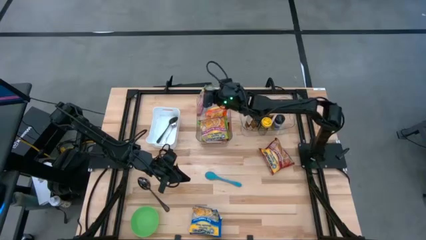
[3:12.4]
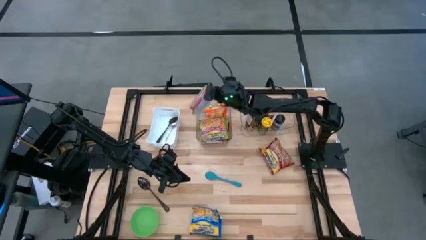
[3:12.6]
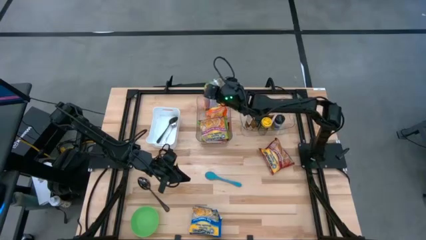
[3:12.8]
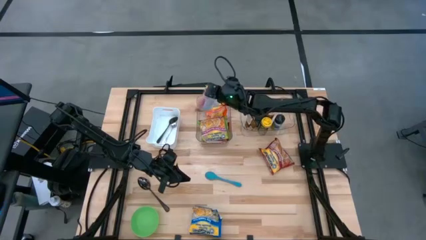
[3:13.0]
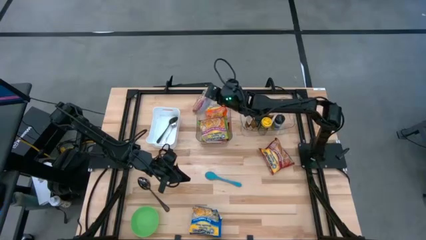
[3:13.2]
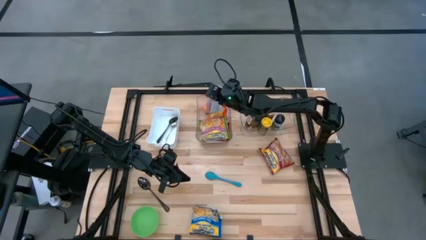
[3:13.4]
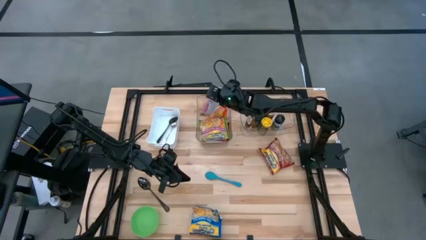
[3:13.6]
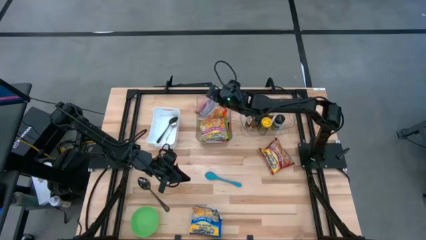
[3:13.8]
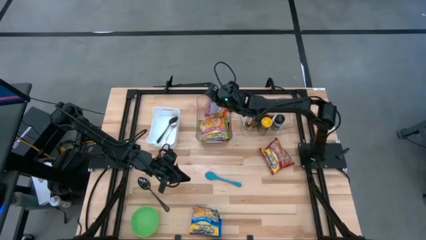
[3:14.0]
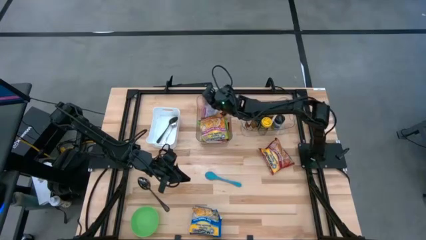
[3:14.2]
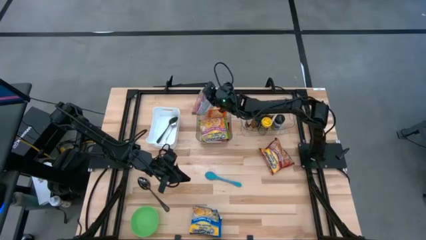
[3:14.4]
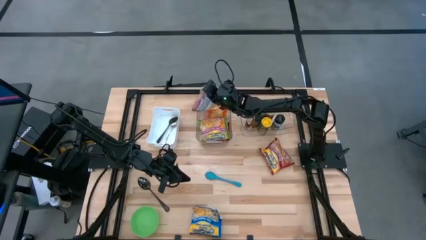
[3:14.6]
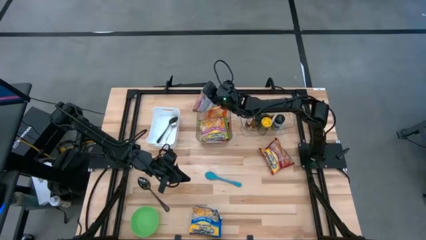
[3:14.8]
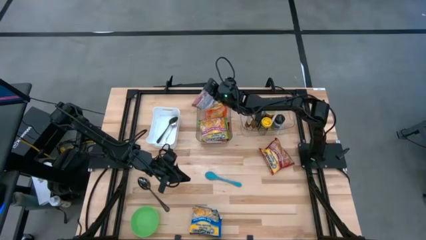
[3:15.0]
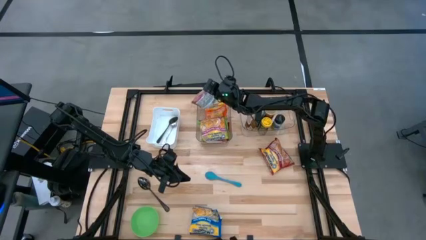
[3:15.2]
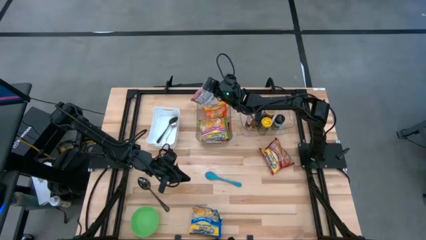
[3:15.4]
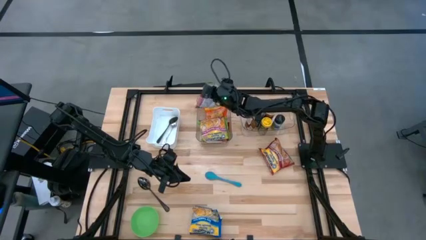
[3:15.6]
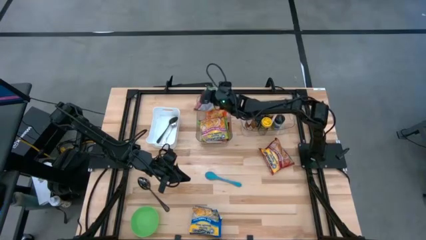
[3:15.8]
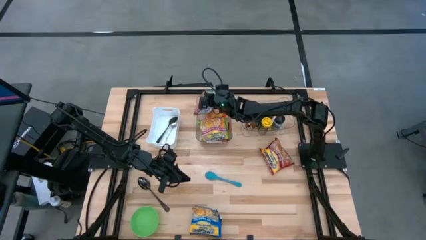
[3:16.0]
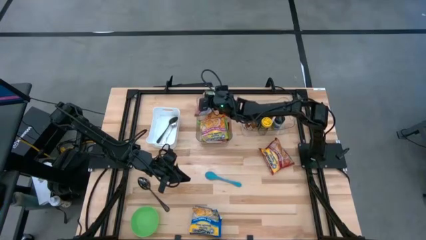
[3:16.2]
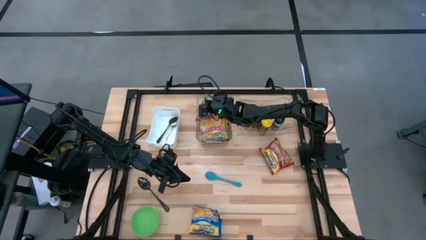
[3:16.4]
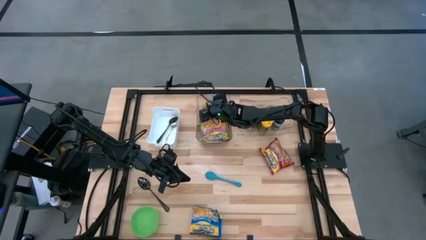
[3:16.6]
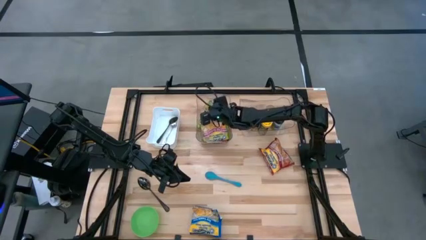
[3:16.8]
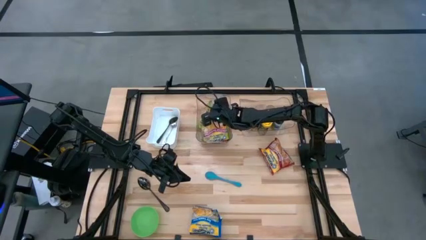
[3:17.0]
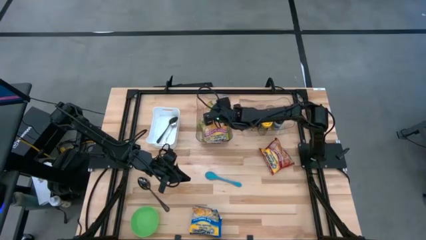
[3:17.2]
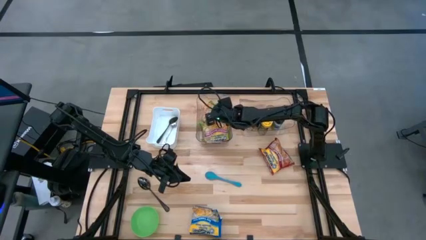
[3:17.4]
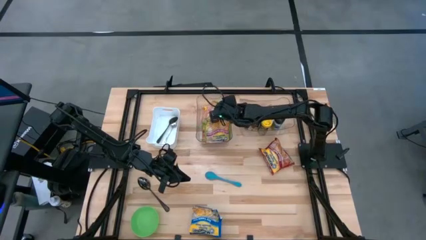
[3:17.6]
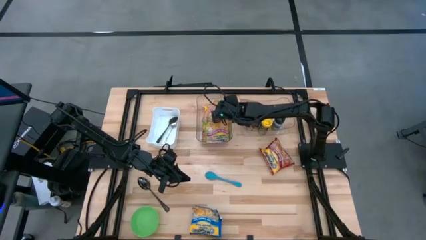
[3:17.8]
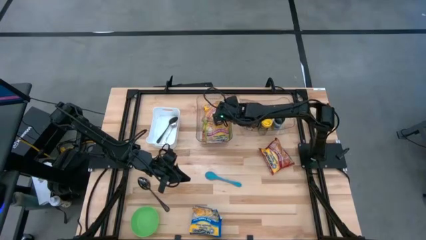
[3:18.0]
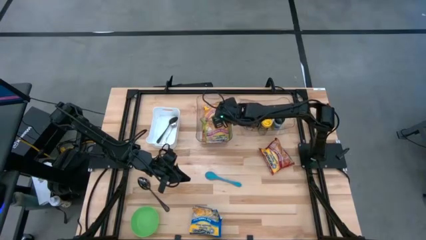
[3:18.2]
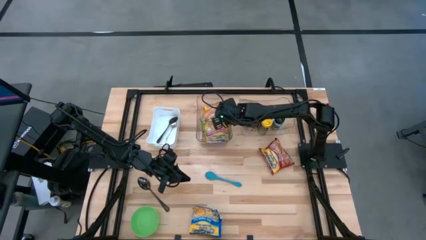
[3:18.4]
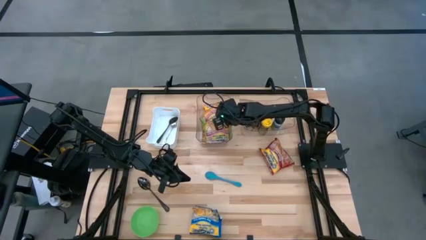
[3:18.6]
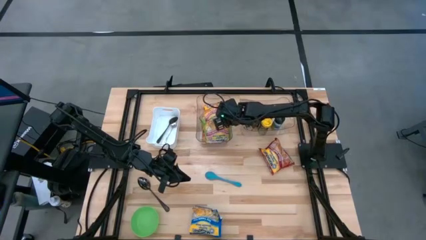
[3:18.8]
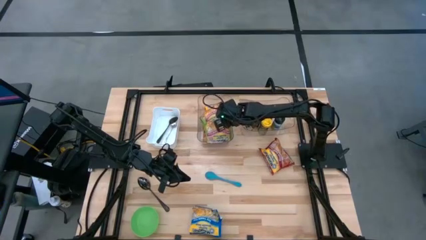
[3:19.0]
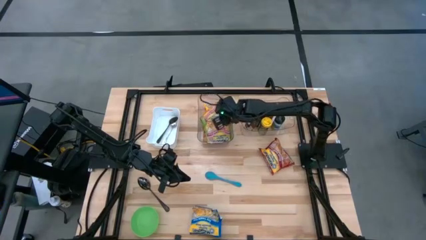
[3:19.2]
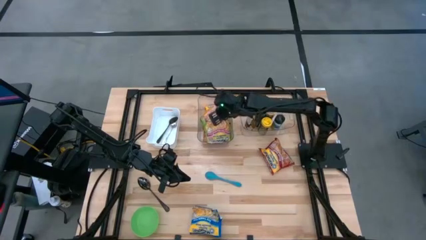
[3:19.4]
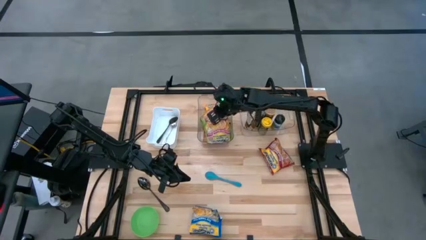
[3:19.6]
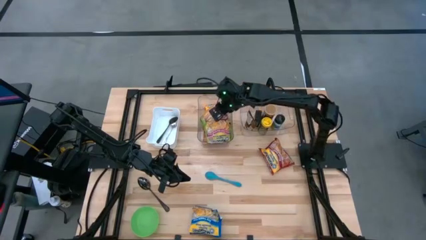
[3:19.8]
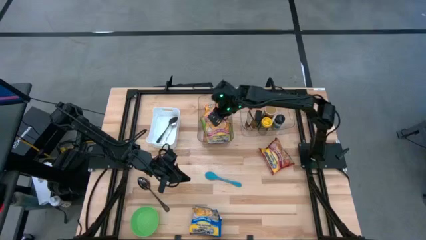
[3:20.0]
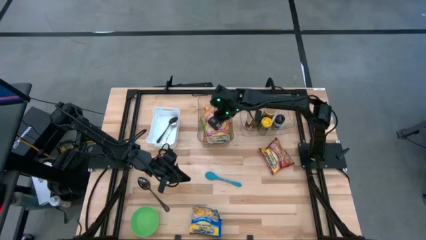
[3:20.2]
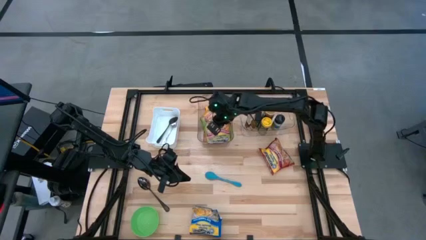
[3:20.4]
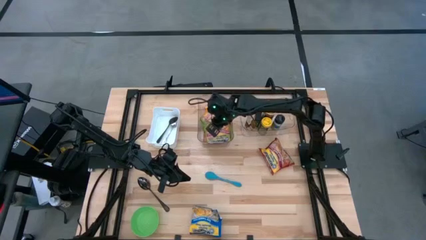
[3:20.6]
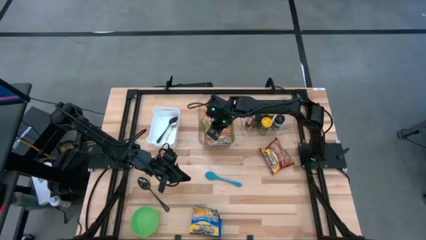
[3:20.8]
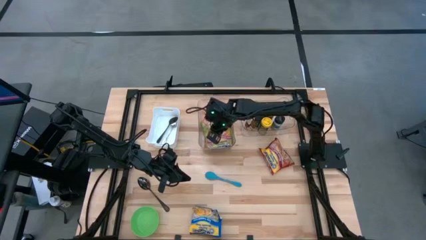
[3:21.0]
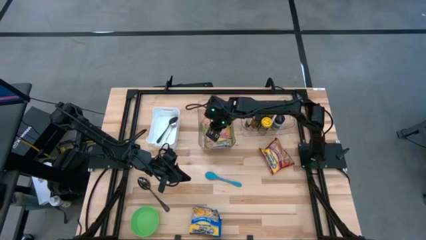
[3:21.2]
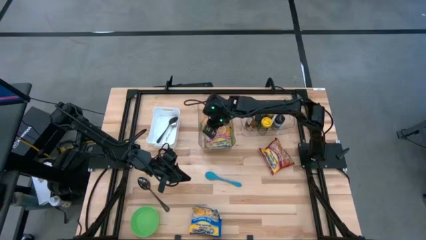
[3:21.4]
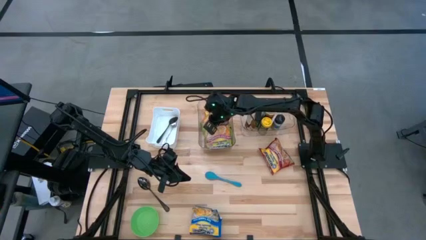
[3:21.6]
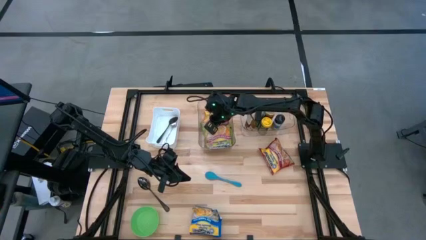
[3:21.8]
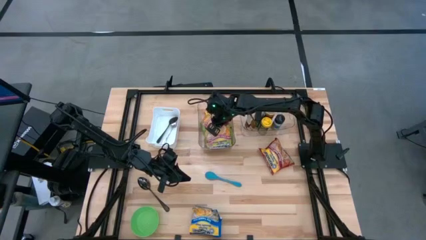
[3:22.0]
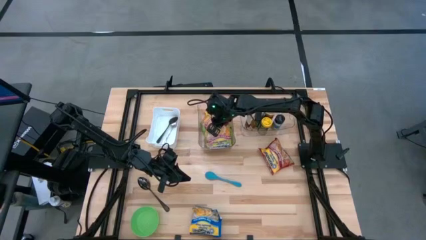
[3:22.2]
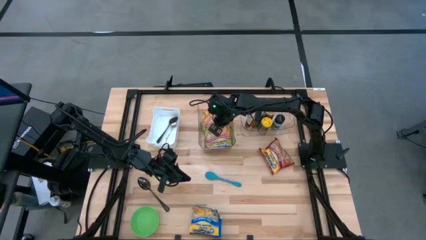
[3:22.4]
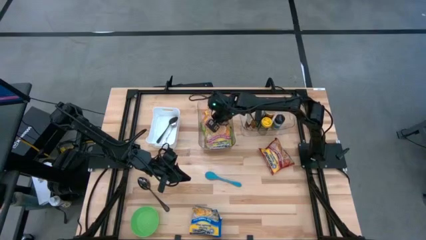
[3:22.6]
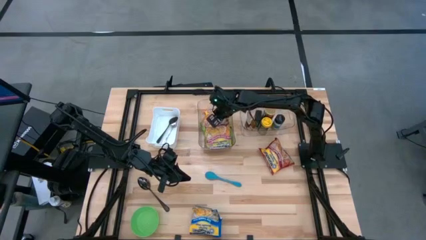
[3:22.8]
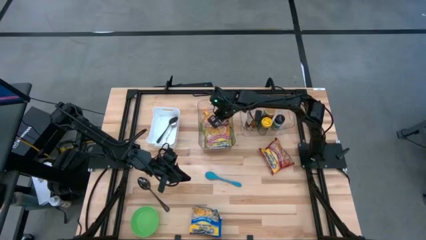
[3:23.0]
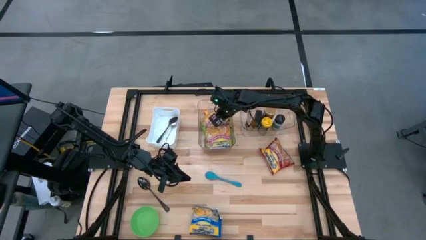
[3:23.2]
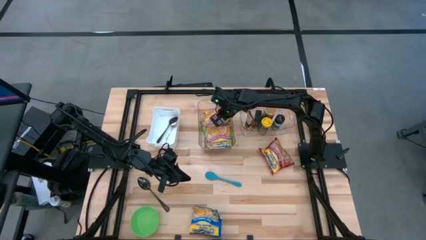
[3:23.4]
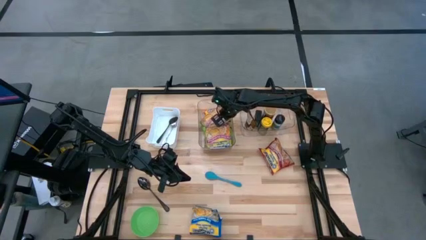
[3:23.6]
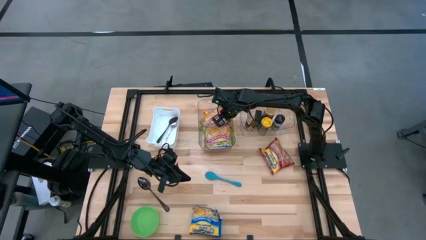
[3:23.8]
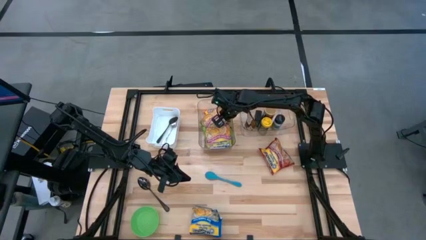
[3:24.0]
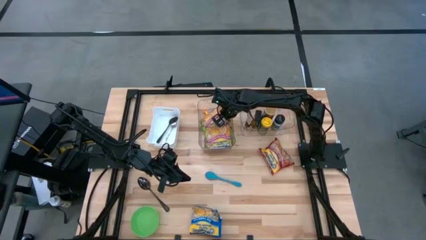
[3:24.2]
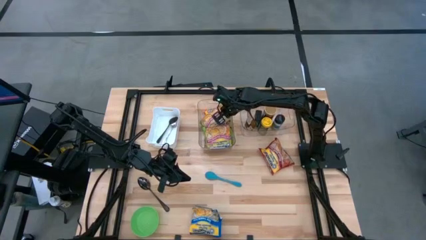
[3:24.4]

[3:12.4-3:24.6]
Task: Pick & Place Food Item
Put the green noodle pack into the left transparent bin

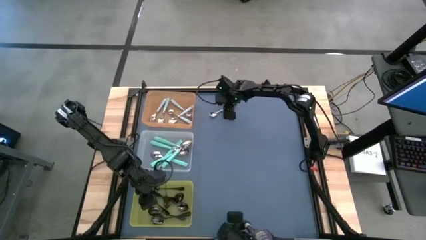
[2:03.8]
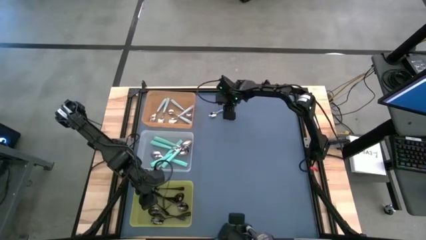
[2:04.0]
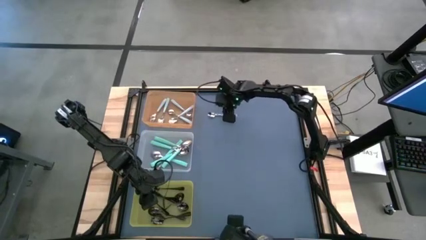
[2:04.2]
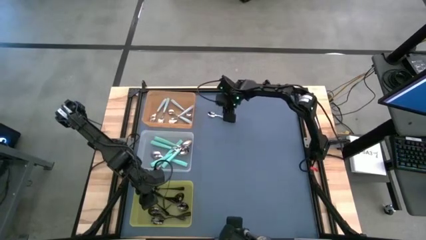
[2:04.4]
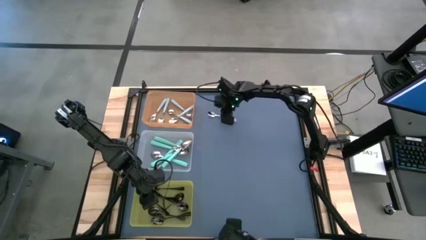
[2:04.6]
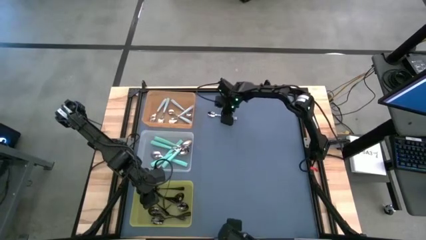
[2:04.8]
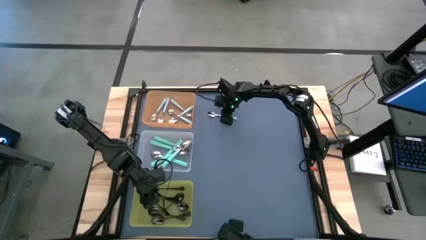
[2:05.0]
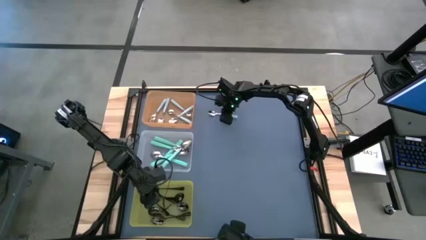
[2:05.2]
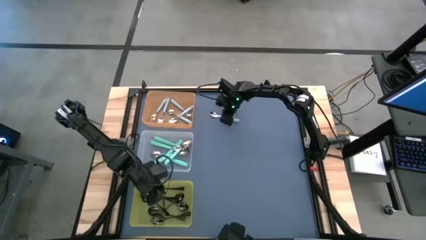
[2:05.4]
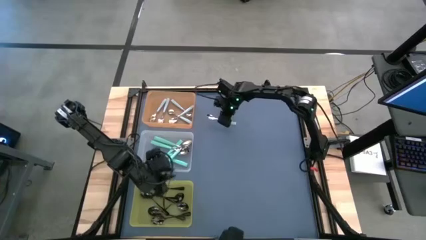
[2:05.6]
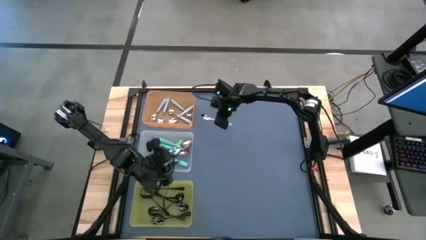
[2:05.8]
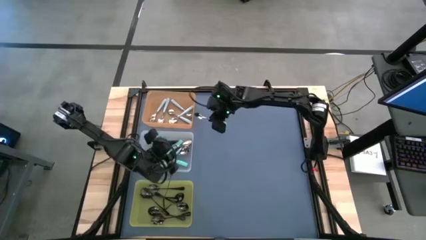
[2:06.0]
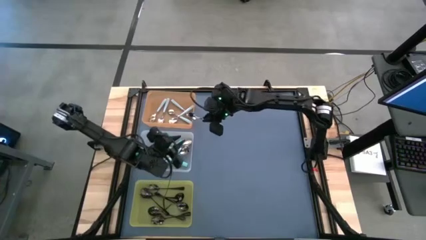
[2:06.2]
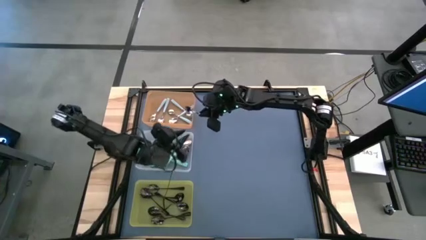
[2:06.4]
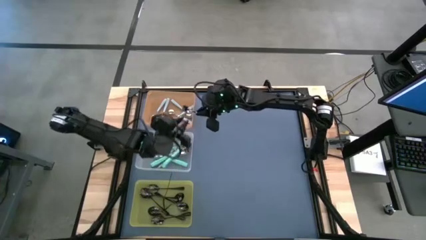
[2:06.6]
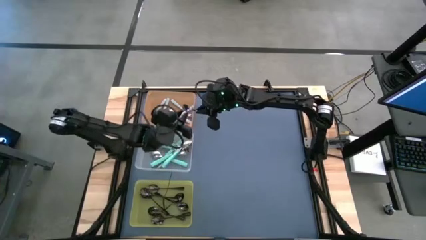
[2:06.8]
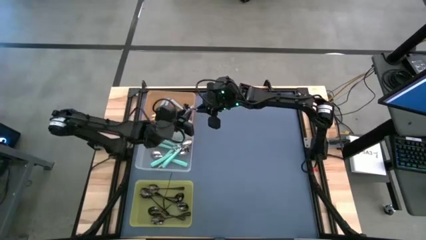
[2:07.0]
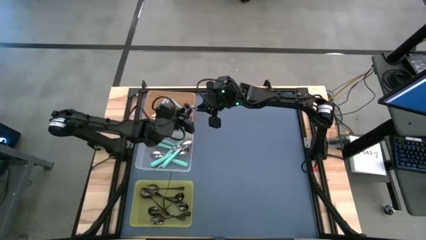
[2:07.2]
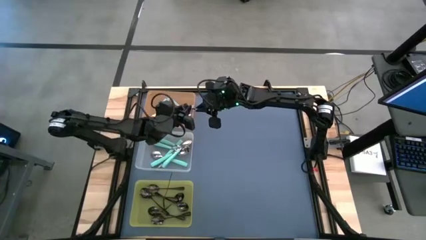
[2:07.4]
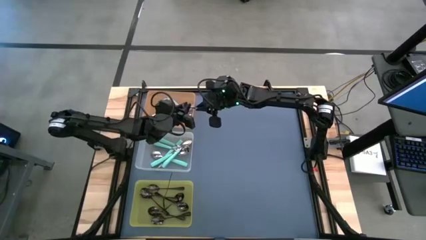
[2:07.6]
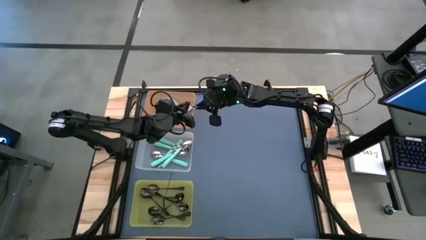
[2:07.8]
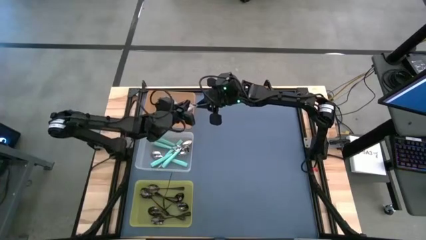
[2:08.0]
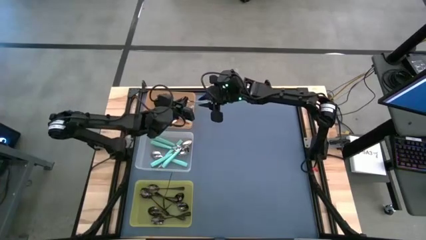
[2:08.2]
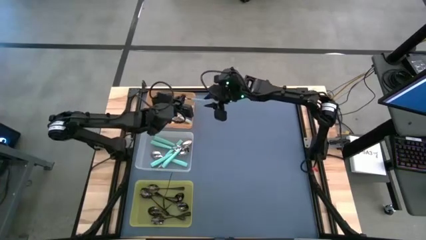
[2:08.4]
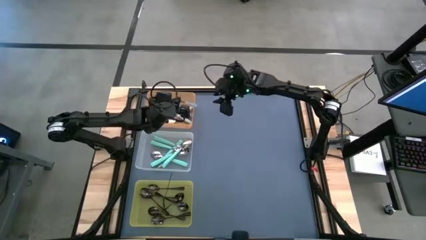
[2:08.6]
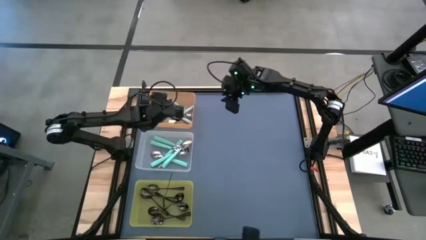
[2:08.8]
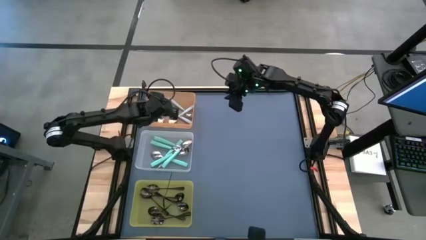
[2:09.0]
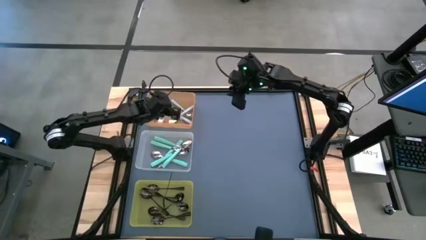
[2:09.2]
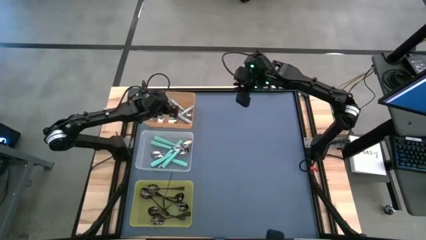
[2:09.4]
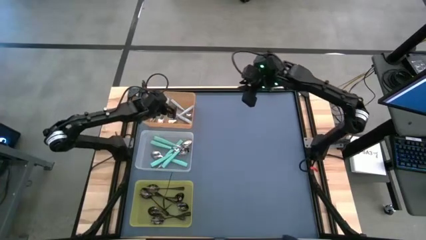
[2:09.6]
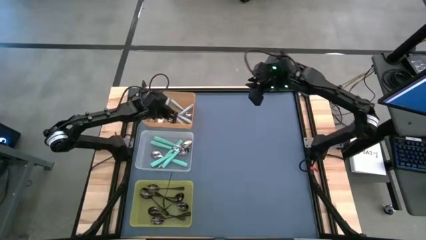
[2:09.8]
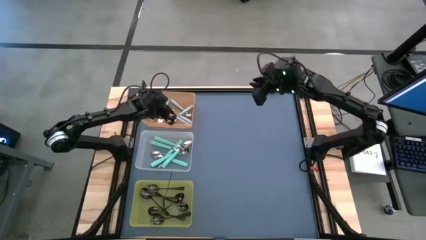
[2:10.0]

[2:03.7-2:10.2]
Task: Sort silverware by color (type)
Put the light blue spoon into the orange bin
